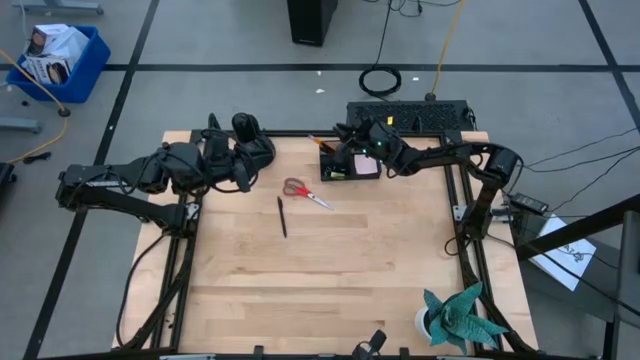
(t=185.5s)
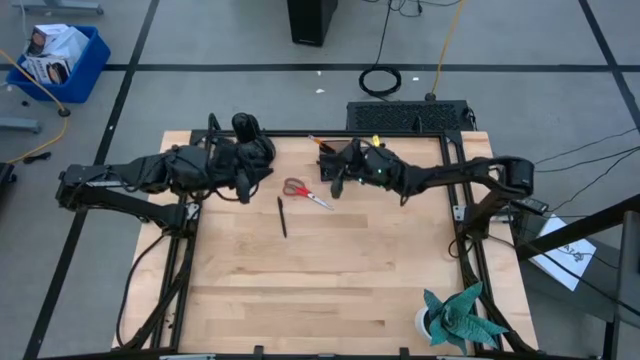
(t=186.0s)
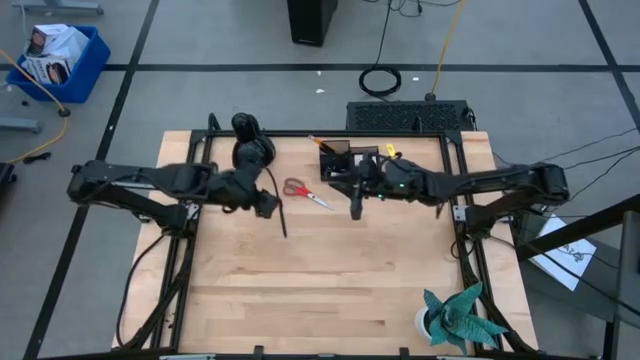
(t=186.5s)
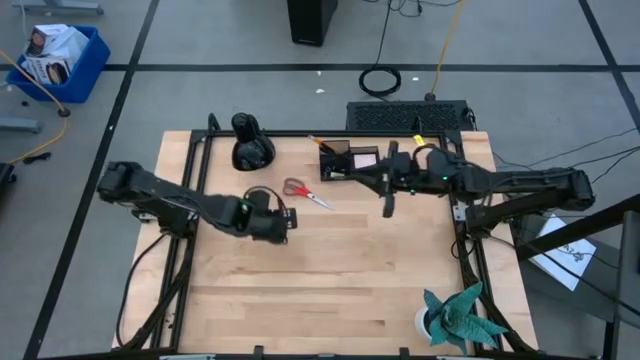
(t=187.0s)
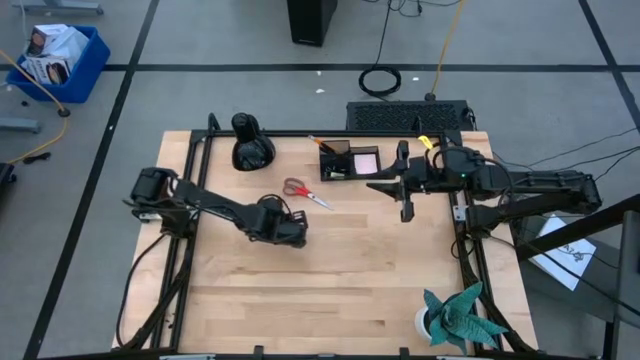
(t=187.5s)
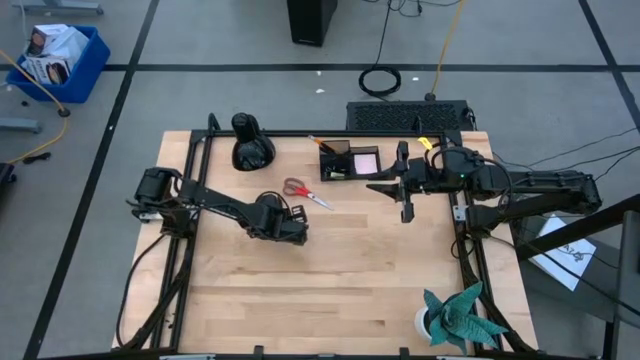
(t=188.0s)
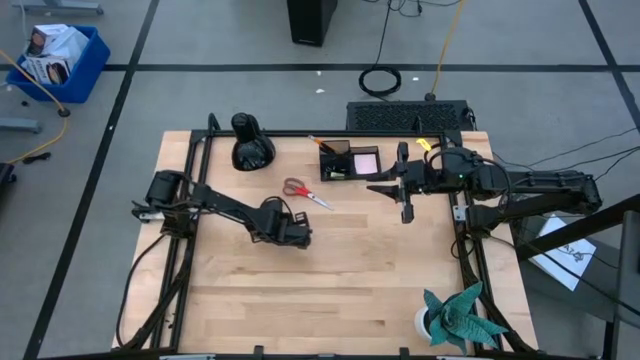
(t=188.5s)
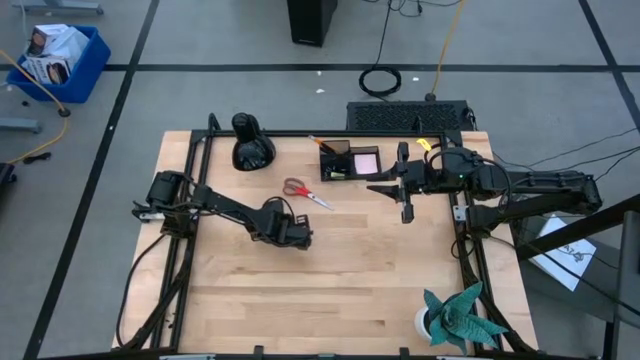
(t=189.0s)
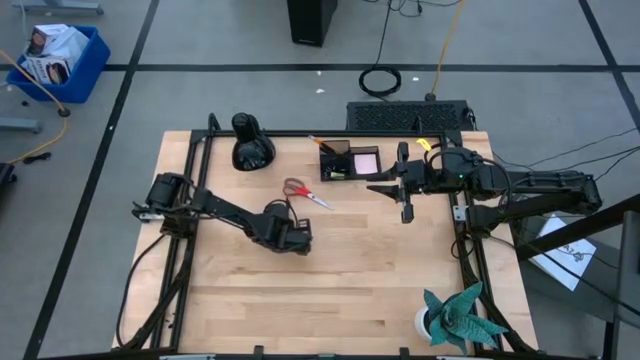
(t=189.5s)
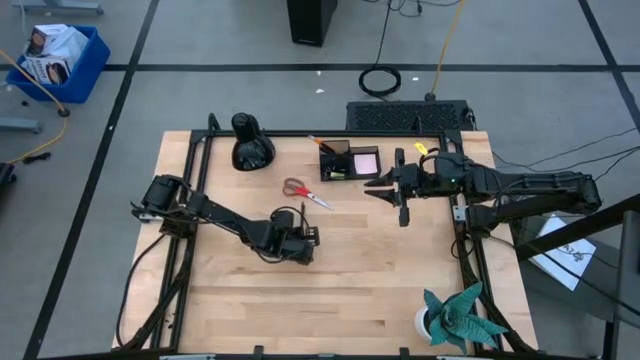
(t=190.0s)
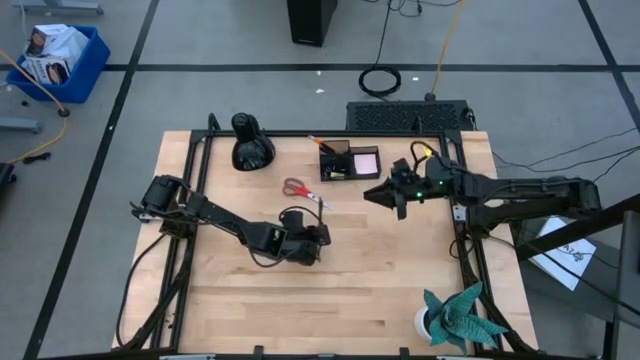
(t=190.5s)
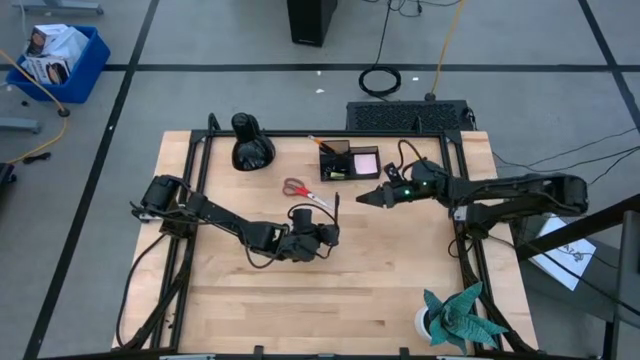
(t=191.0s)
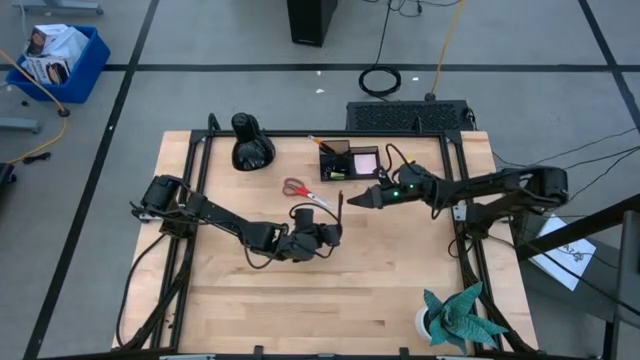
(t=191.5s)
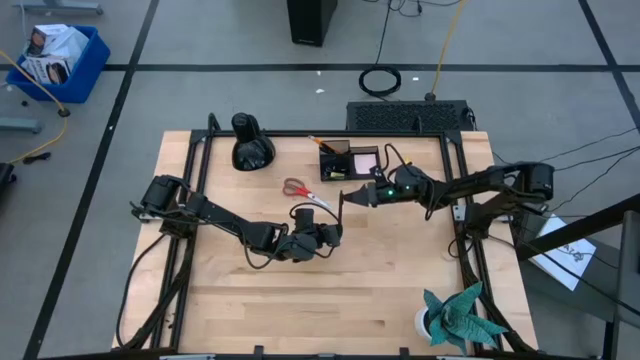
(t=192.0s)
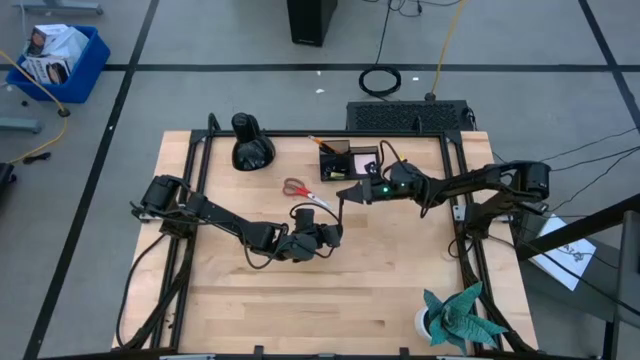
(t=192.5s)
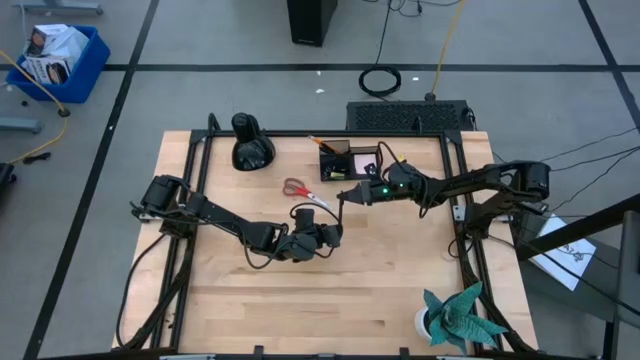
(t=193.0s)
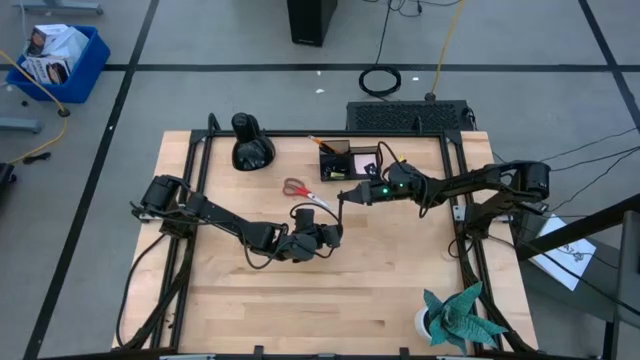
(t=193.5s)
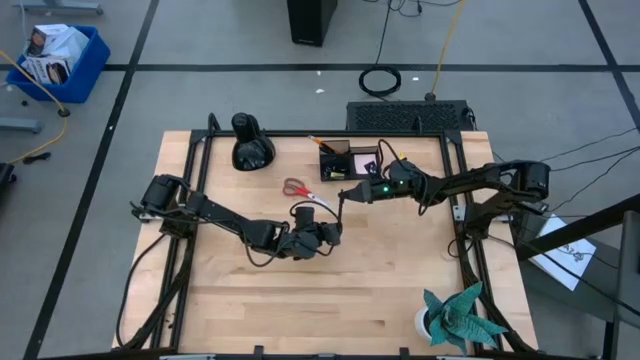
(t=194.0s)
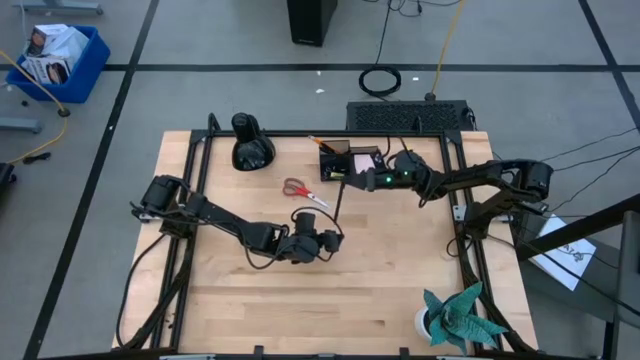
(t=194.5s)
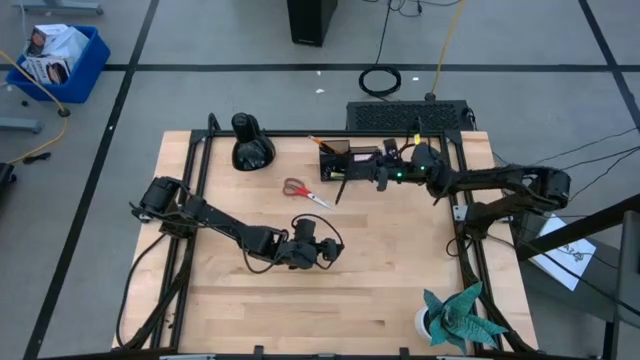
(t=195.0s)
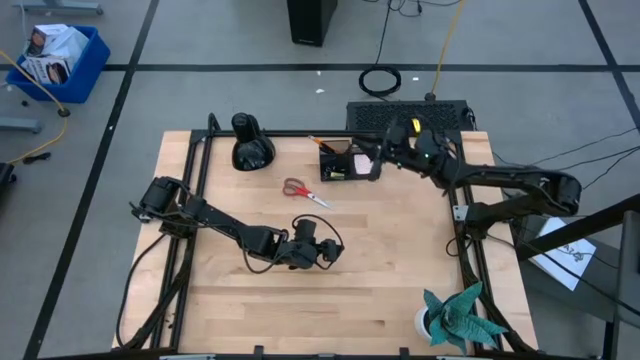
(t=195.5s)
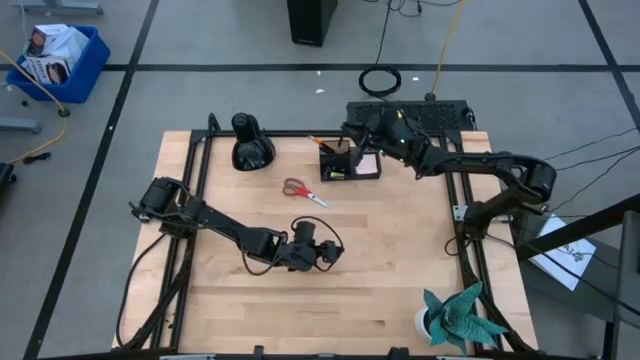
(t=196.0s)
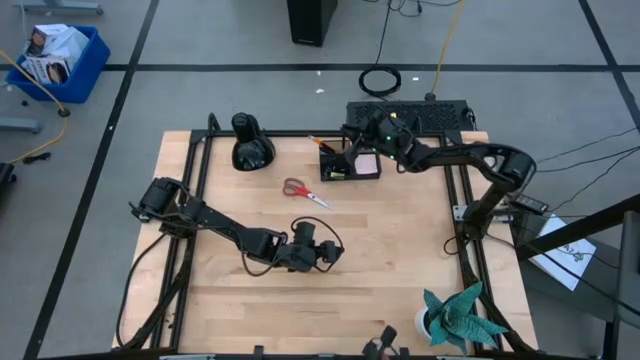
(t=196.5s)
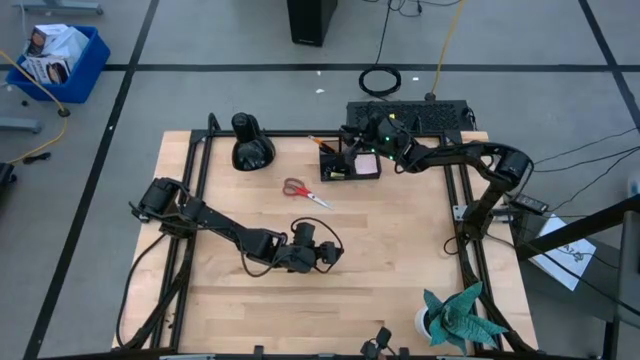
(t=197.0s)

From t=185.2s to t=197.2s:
Task: Pick and place office supplies into organizer
Put the black pen into the black desk organizer

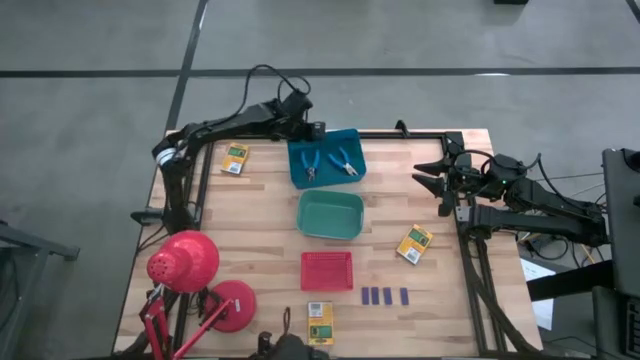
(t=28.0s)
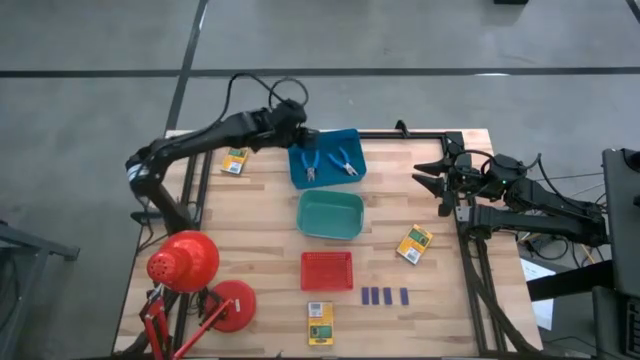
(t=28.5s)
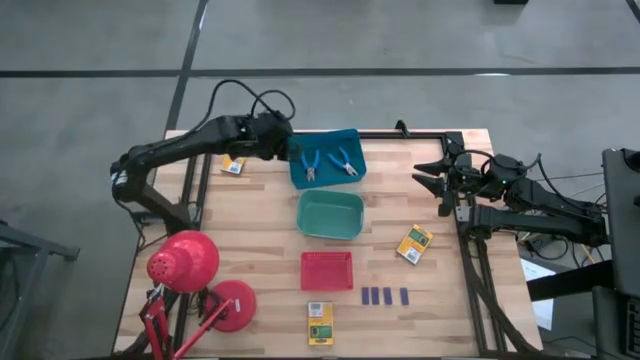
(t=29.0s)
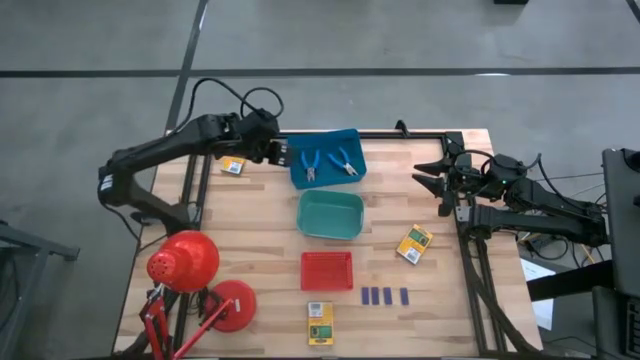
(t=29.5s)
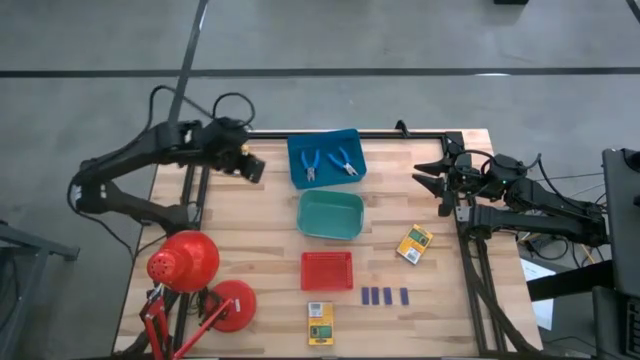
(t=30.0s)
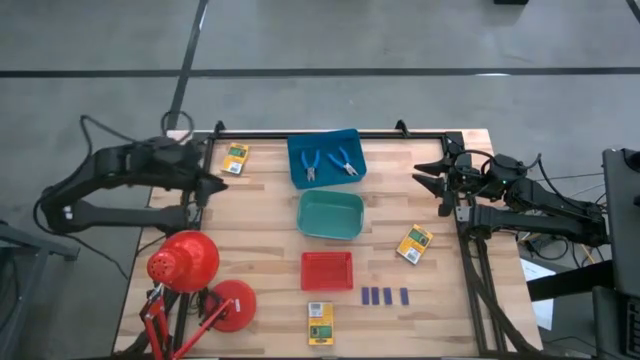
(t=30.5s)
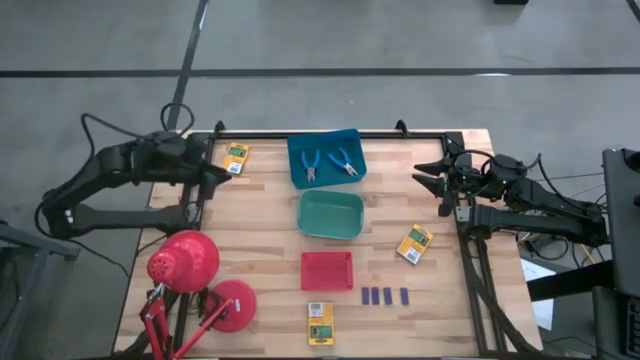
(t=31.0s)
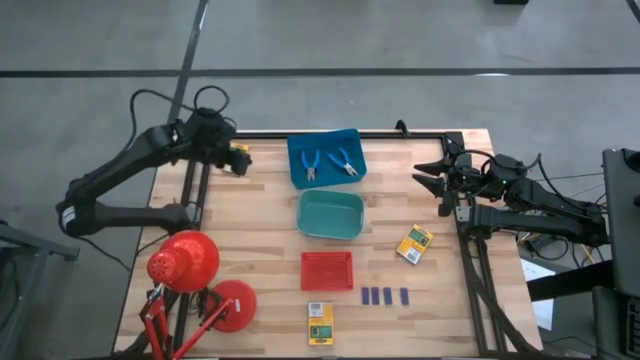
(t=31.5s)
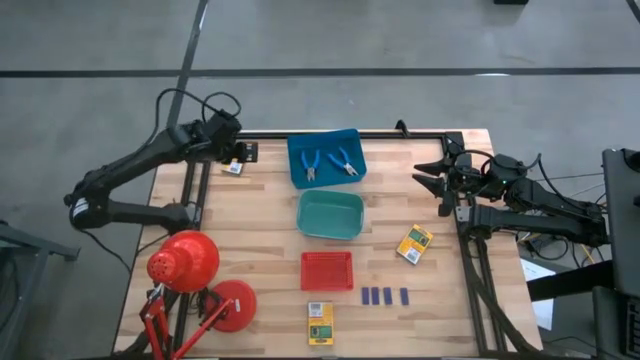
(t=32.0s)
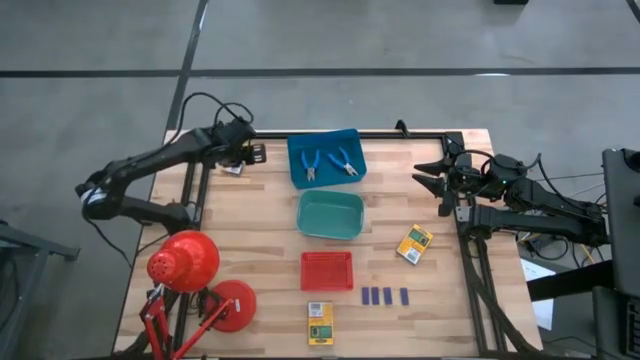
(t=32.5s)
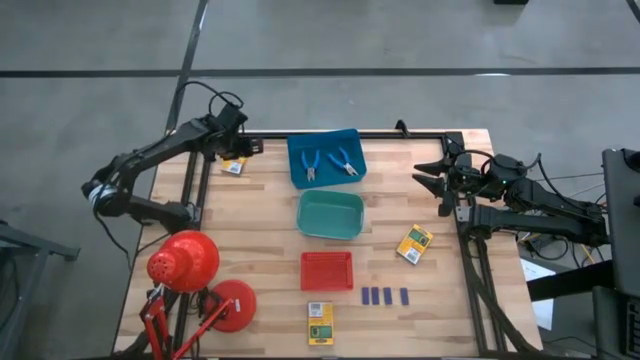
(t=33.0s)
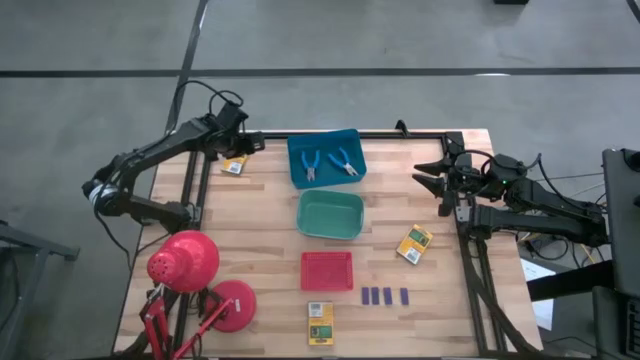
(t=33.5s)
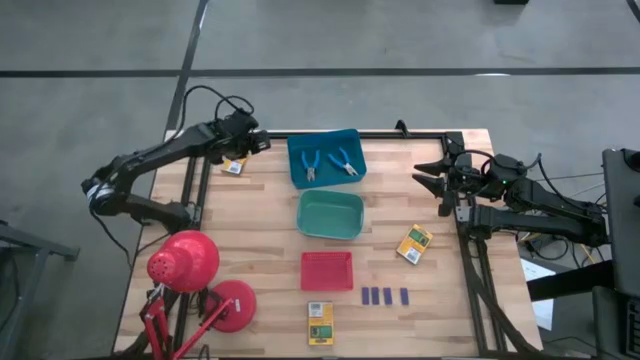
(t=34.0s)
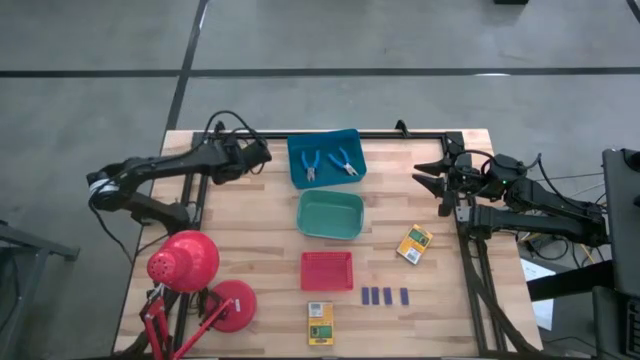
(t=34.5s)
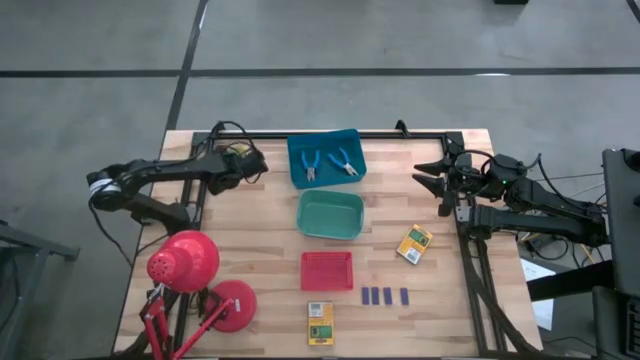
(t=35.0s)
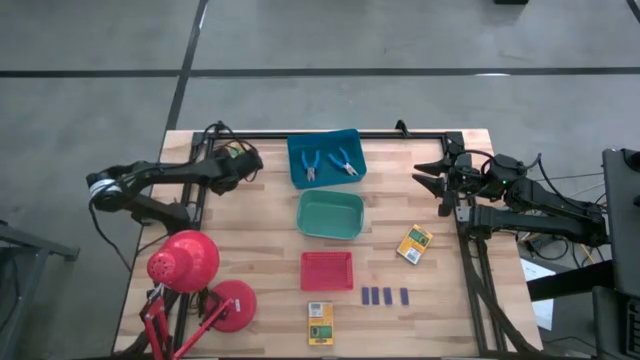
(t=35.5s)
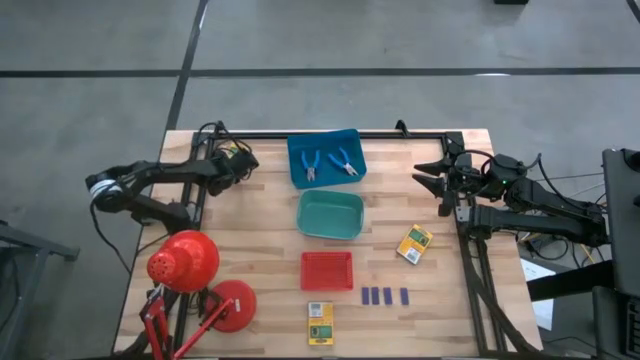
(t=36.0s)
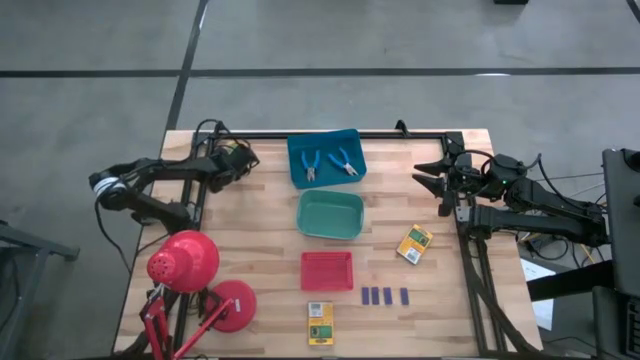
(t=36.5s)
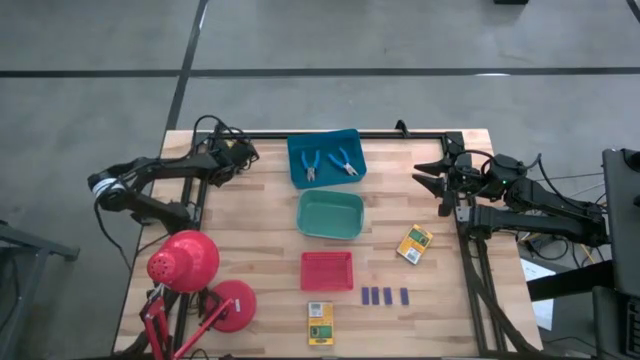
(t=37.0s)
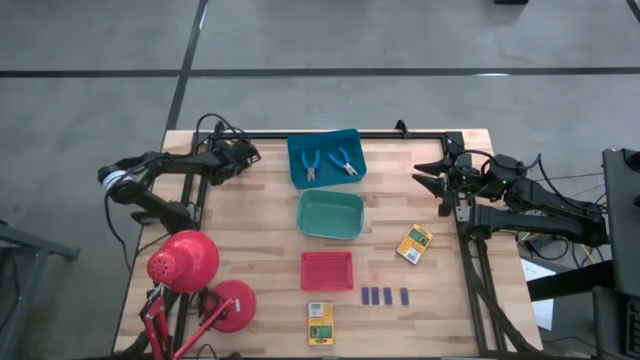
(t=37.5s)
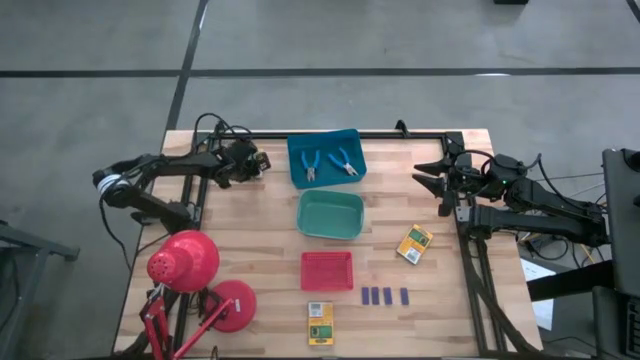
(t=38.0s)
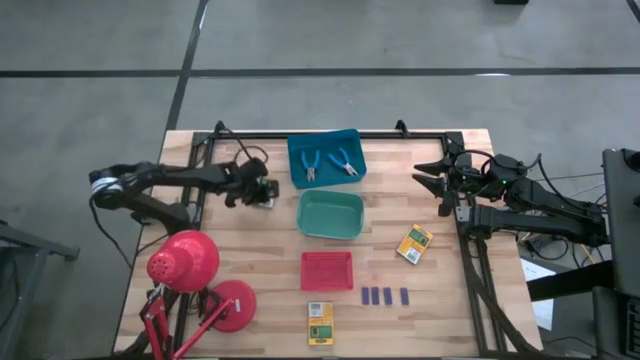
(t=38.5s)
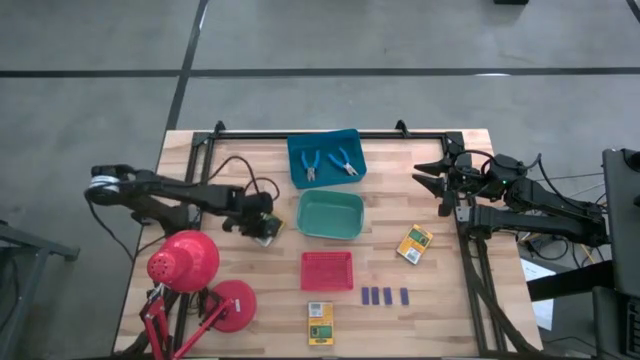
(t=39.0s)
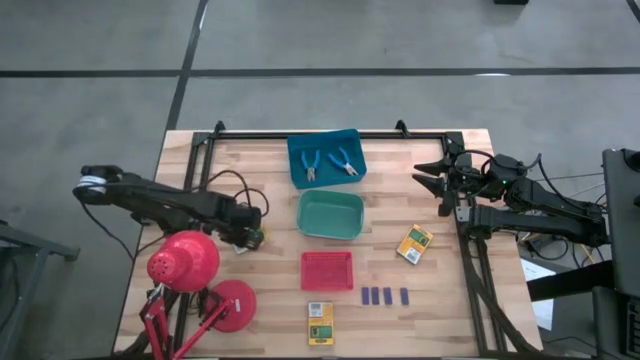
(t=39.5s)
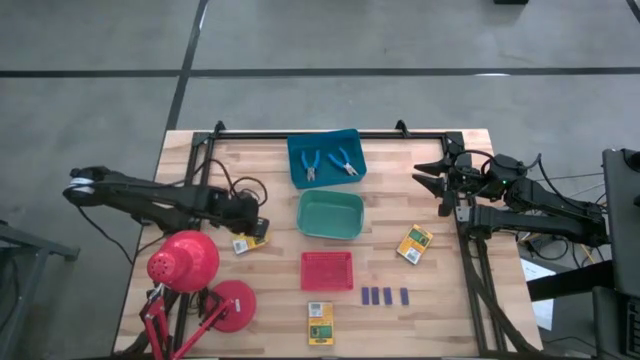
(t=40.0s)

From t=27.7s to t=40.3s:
Task: Pick & Place School Supplies
Put the yellow crayon box in the green bin
